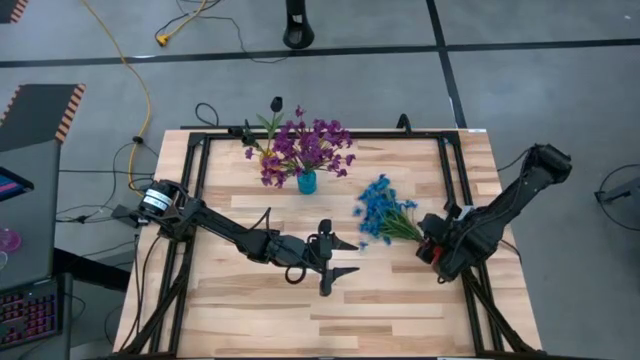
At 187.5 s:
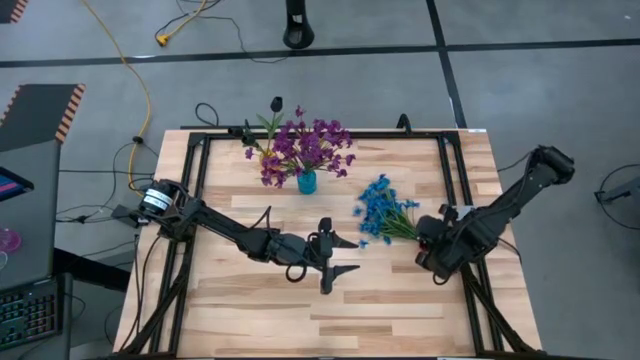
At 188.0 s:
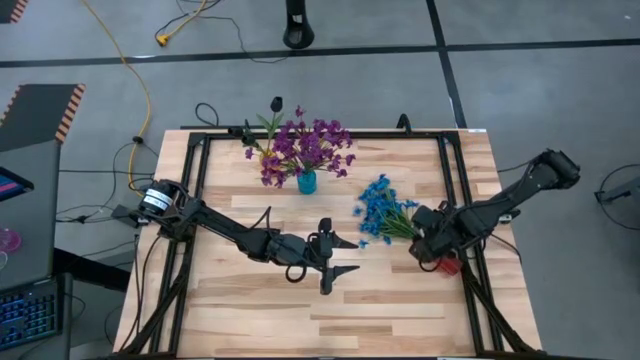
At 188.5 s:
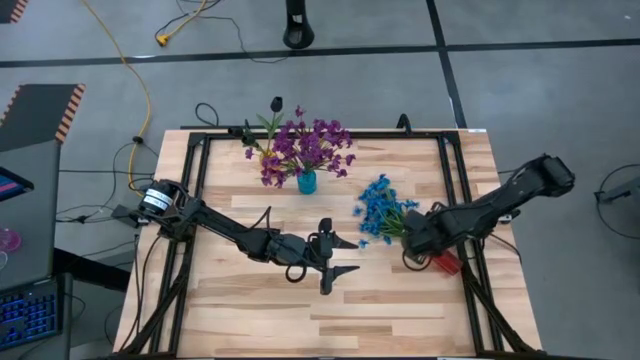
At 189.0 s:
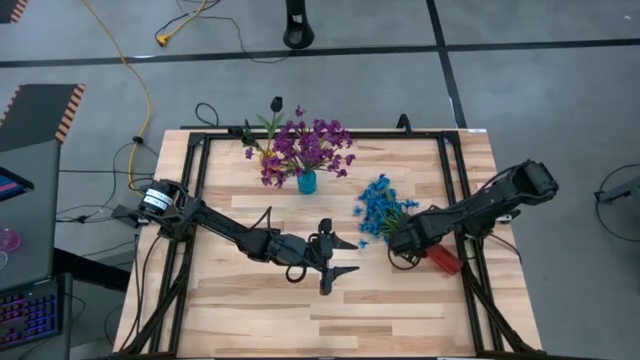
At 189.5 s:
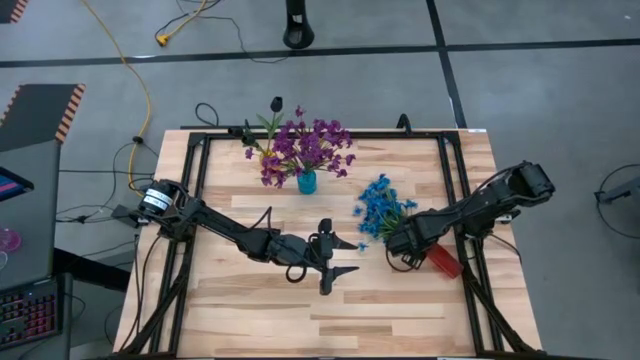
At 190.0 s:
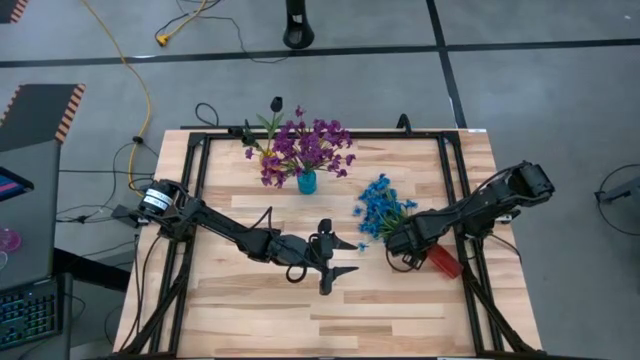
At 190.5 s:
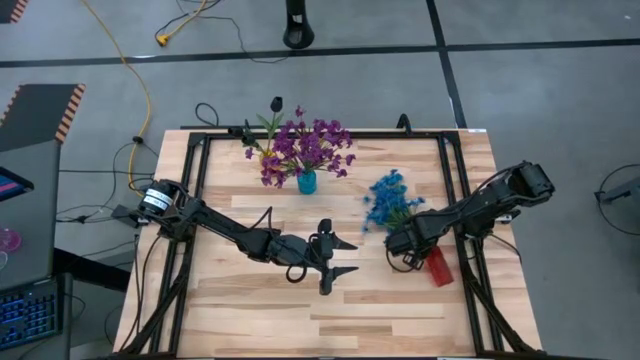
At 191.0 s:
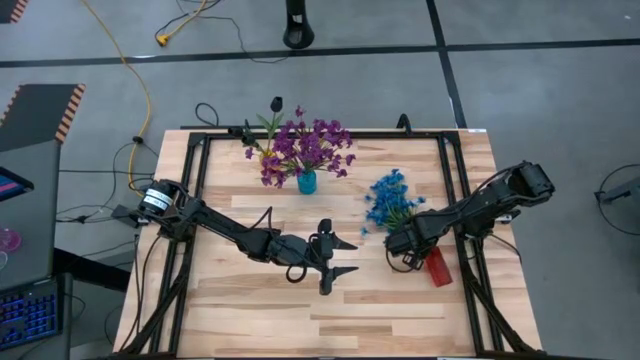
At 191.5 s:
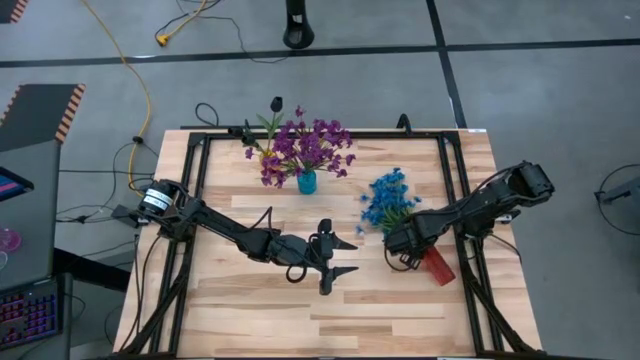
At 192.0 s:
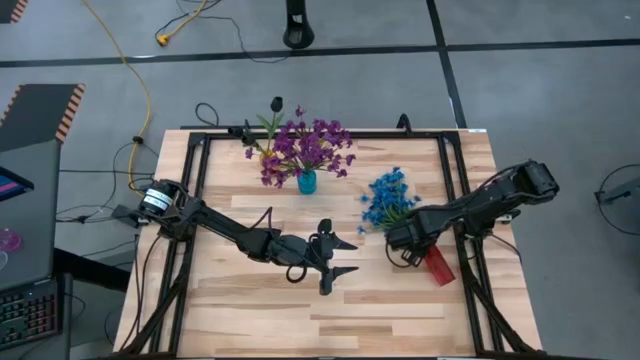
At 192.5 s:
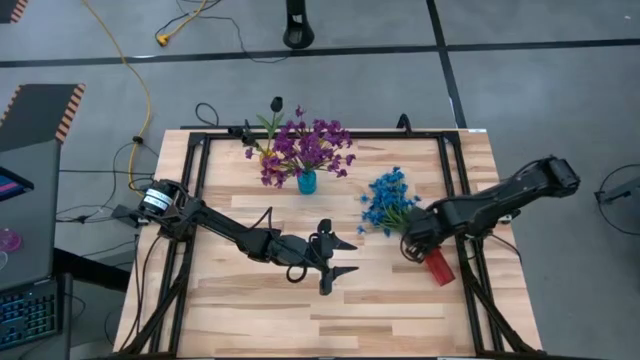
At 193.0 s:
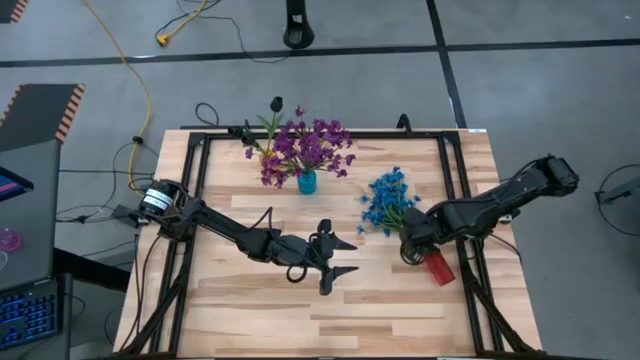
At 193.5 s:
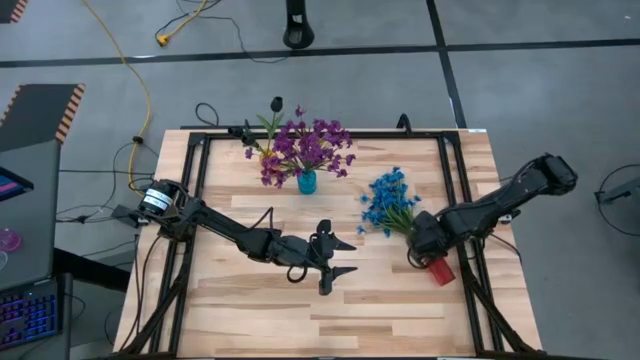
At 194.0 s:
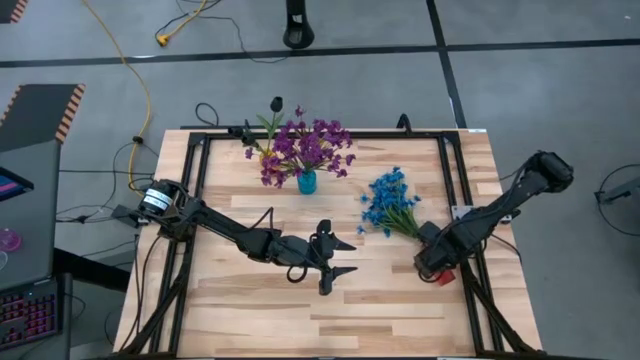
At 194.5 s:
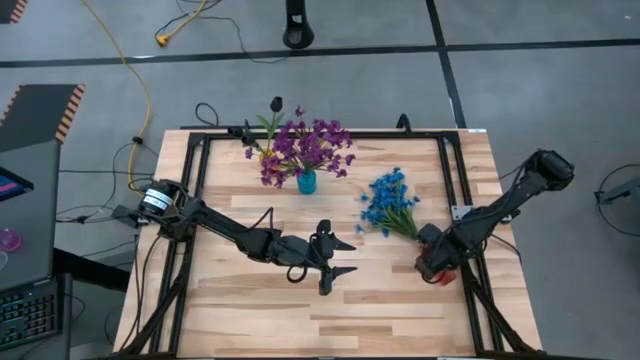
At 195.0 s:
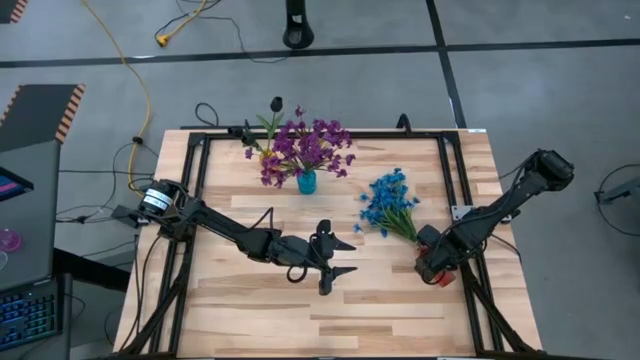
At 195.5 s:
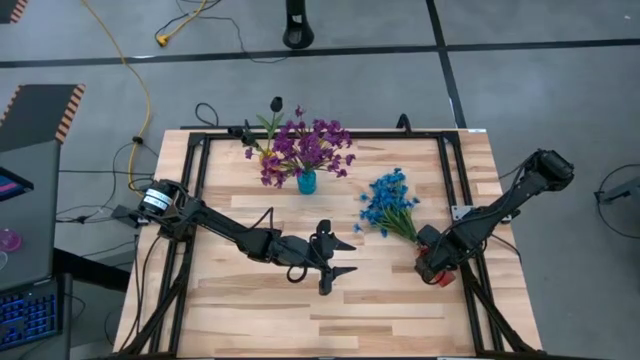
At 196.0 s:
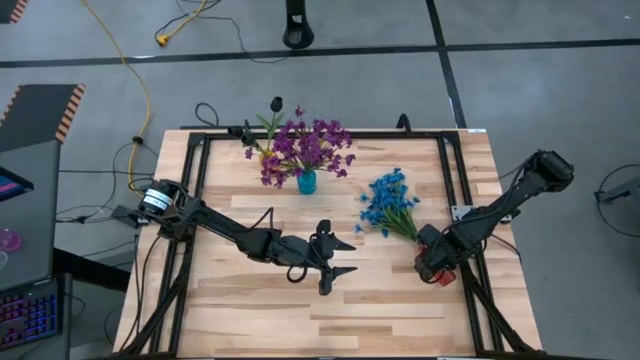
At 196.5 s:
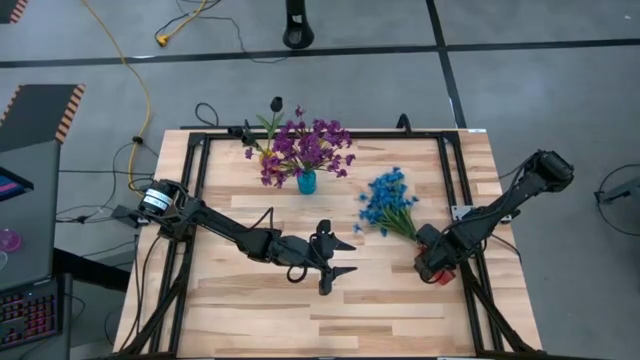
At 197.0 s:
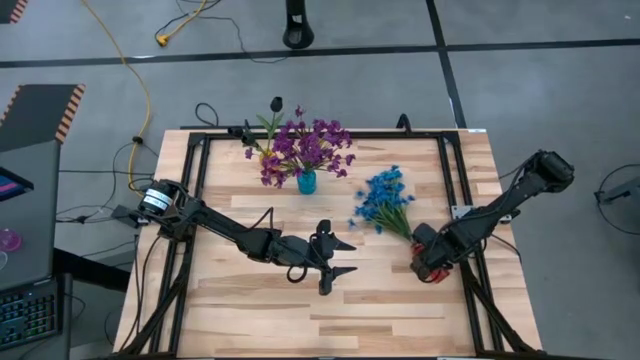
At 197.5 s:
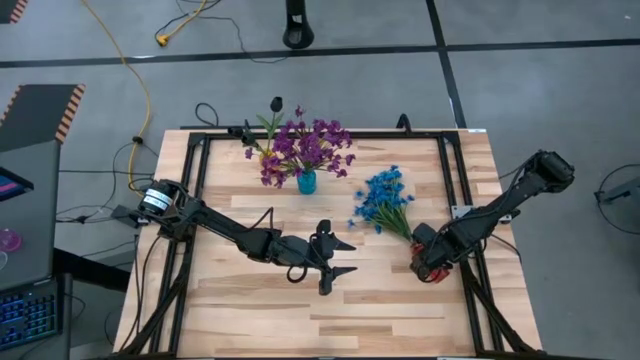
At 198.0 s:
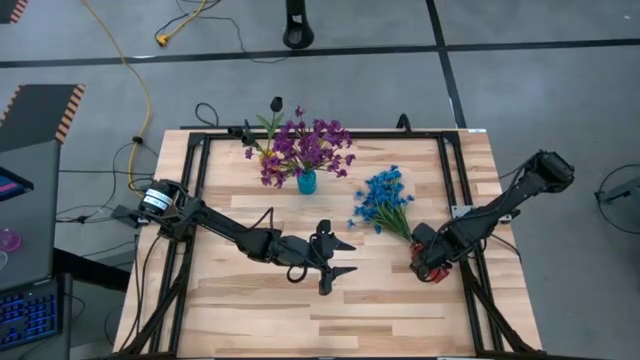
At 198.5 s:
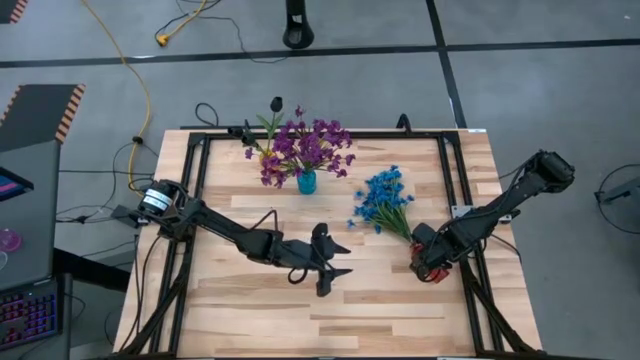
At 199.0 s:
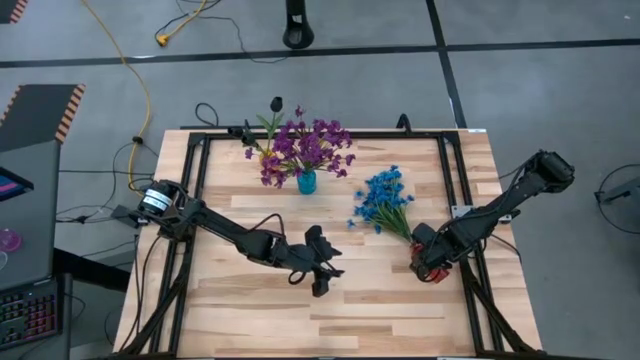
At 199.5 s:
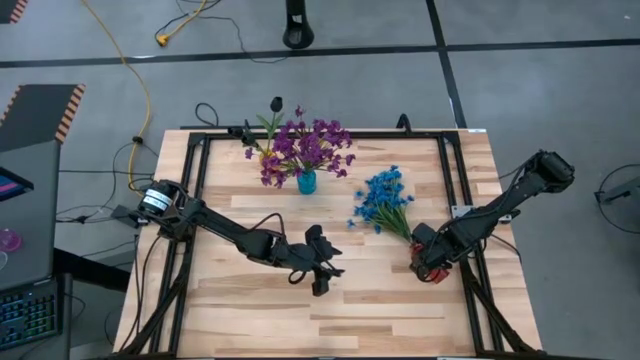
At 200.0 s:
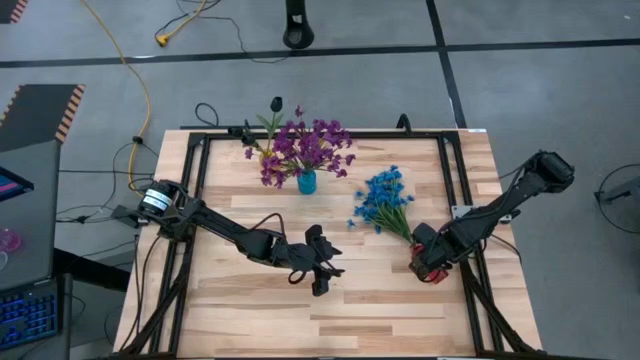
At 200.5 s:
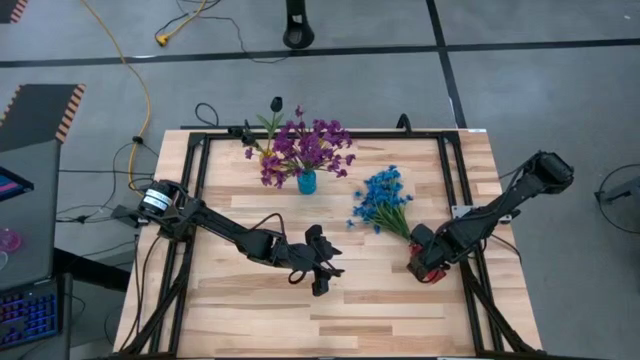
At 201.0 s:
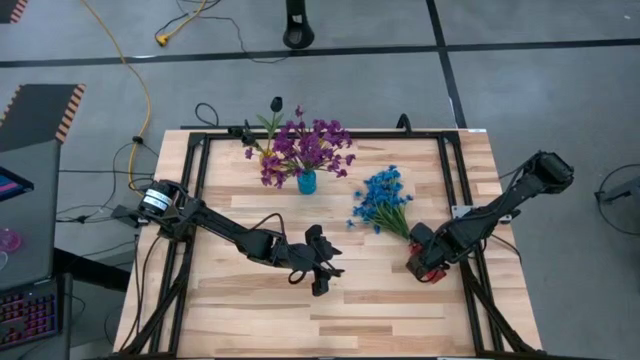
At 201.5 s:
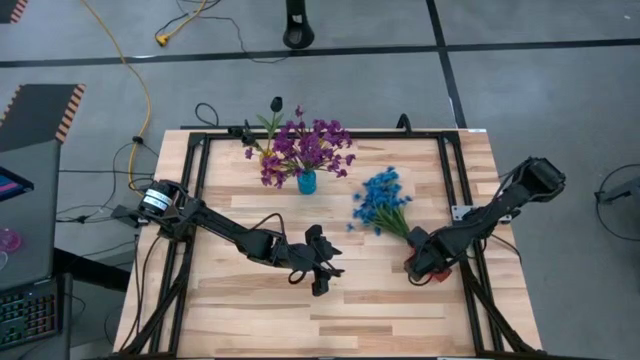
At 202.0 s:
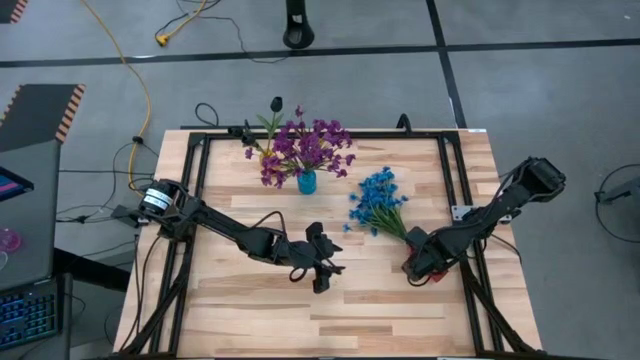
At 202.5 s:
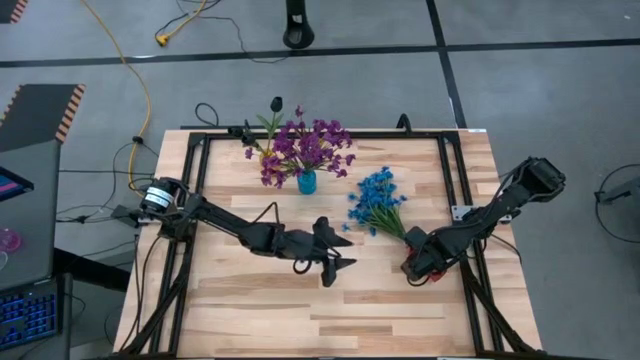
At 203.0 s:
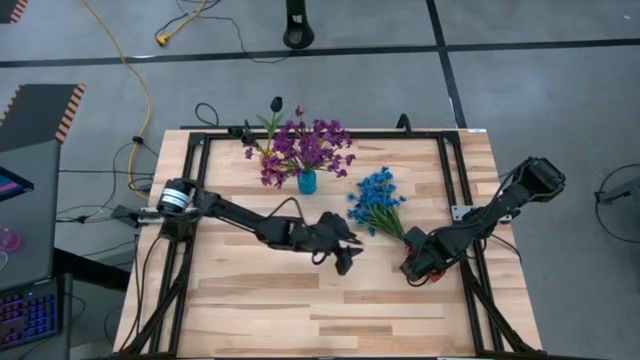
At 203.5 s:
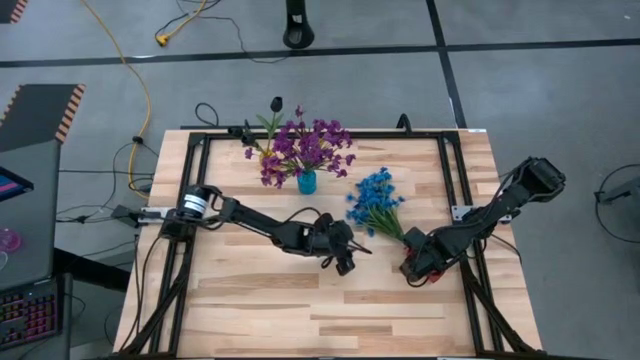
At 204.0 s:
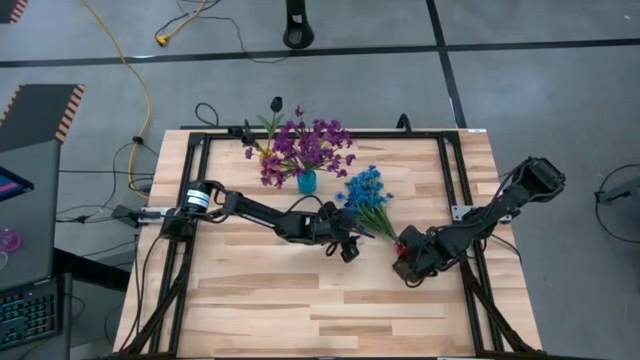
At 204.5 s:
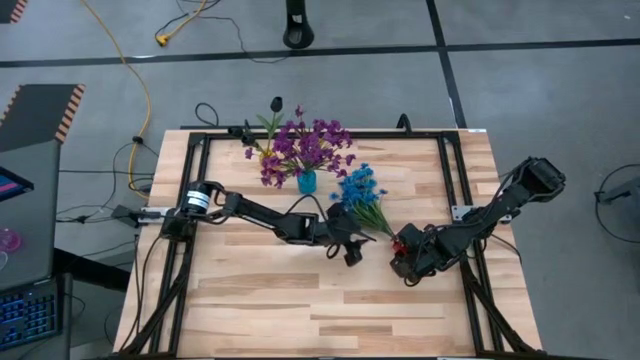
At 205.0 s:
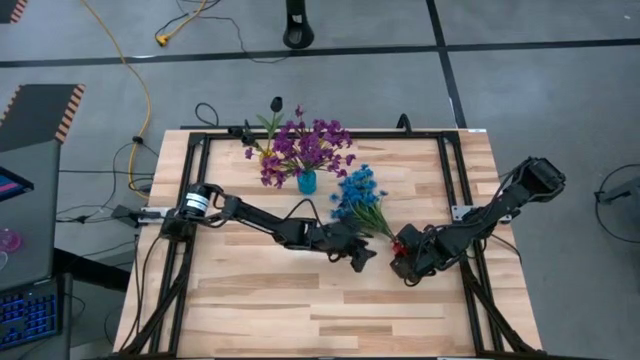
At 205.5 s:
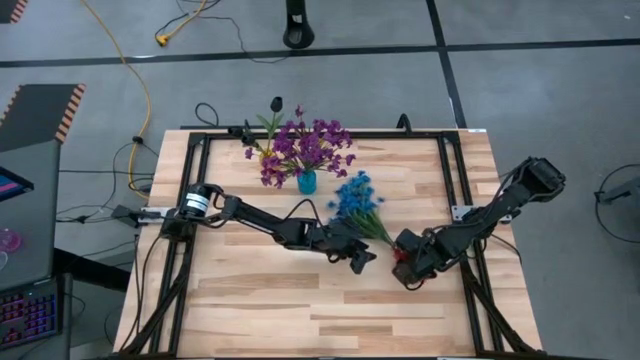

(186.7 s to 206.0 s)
Task: Sort flowers into vase by color
Adjust the red vase with flowers
